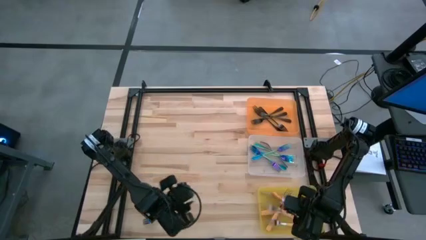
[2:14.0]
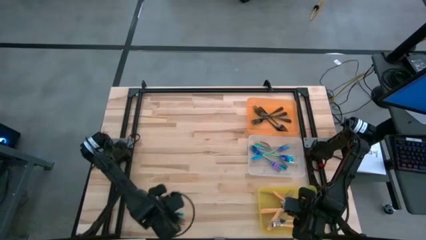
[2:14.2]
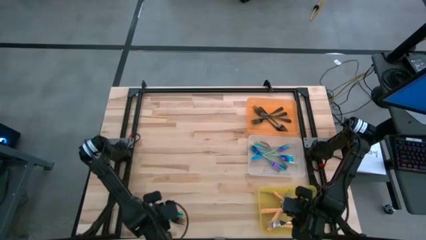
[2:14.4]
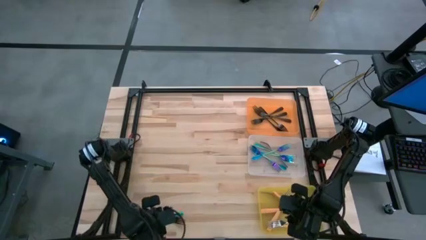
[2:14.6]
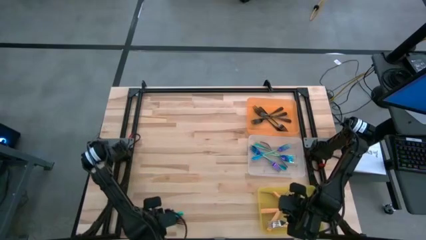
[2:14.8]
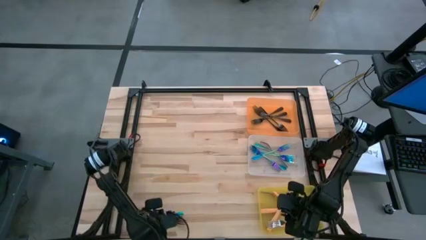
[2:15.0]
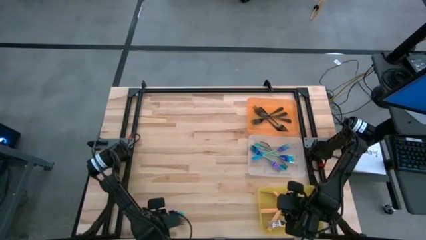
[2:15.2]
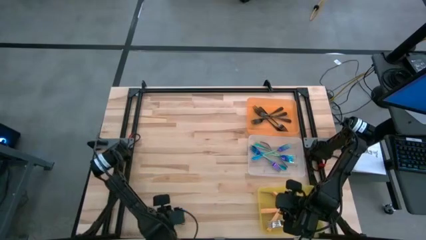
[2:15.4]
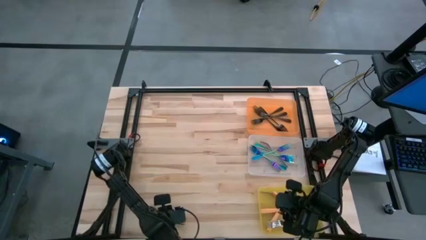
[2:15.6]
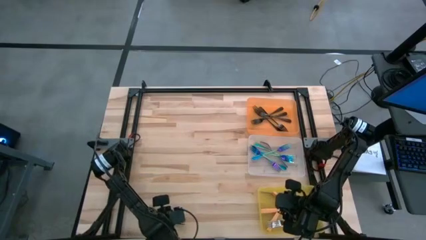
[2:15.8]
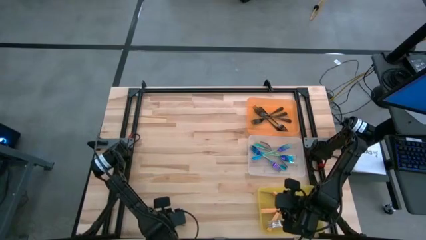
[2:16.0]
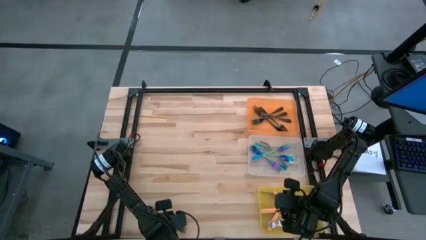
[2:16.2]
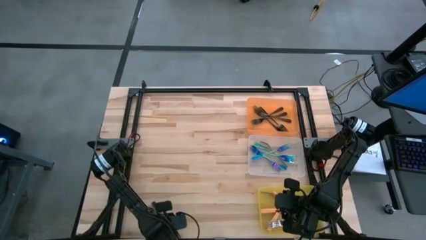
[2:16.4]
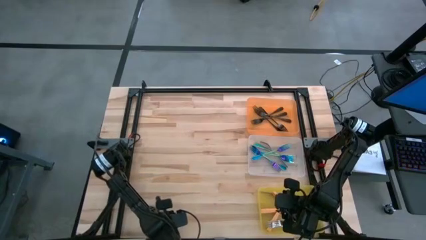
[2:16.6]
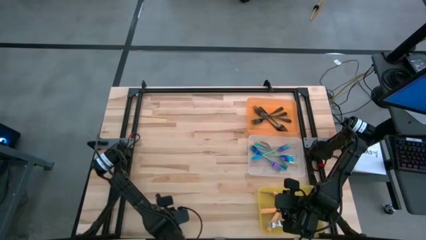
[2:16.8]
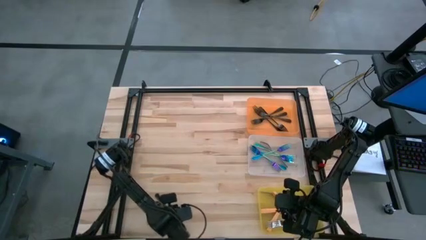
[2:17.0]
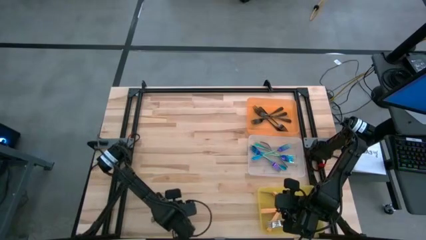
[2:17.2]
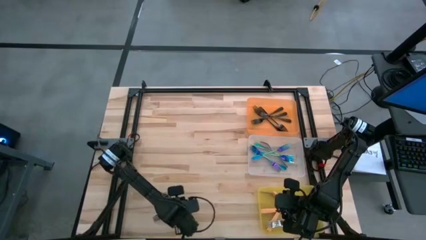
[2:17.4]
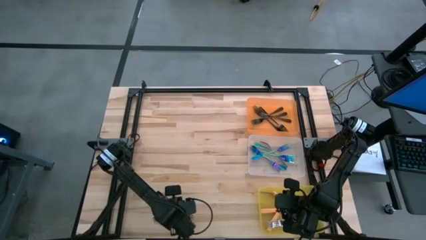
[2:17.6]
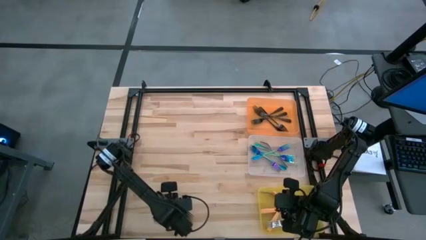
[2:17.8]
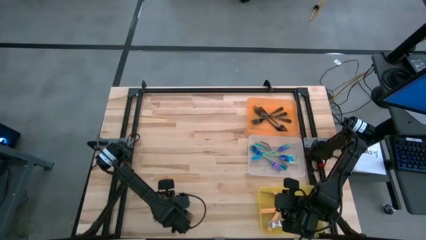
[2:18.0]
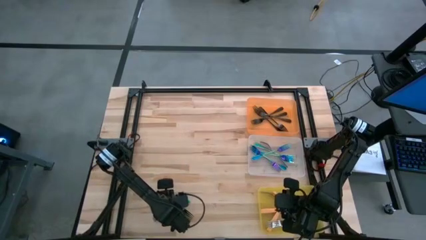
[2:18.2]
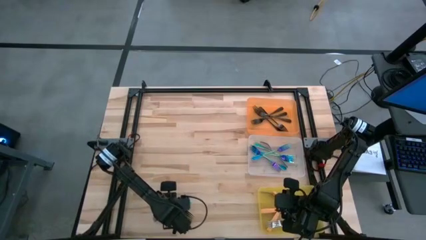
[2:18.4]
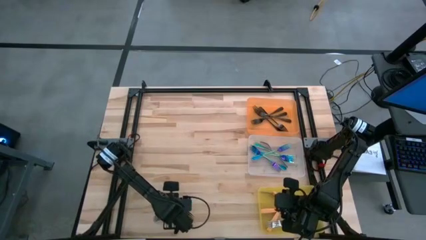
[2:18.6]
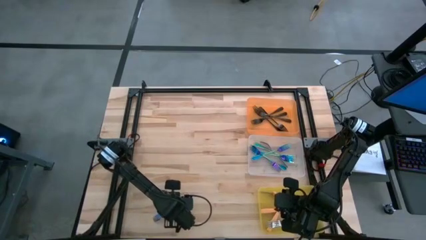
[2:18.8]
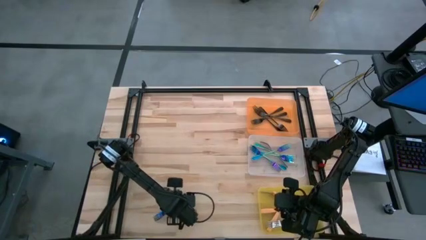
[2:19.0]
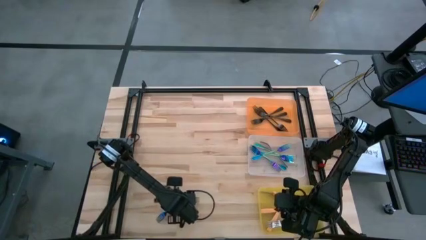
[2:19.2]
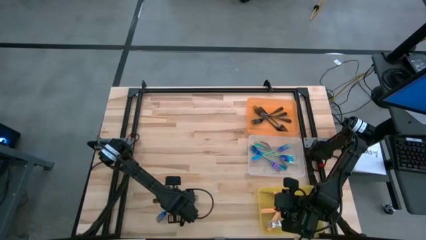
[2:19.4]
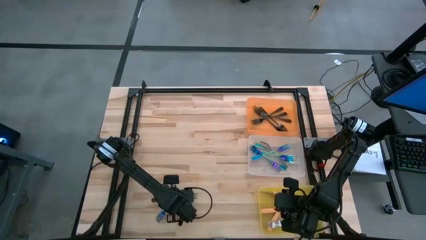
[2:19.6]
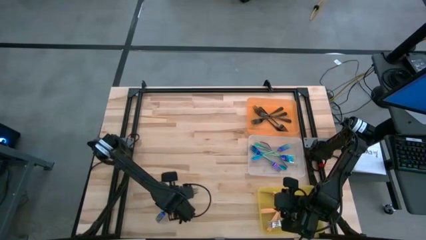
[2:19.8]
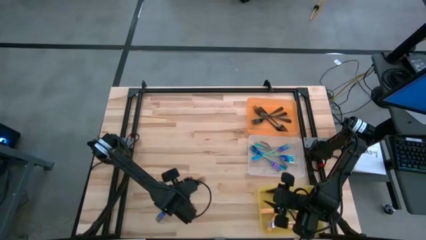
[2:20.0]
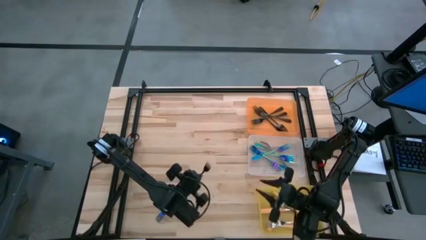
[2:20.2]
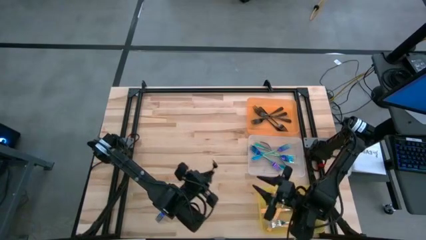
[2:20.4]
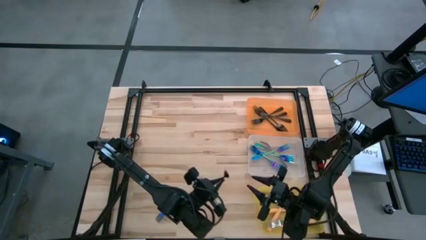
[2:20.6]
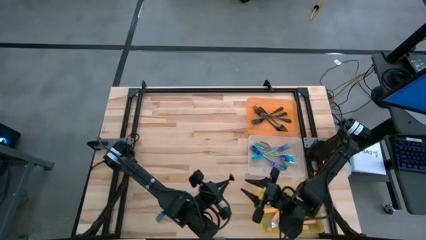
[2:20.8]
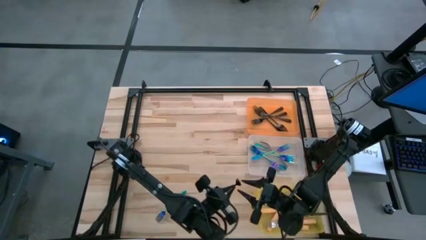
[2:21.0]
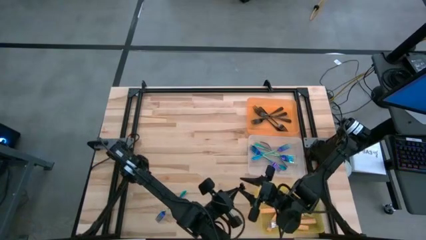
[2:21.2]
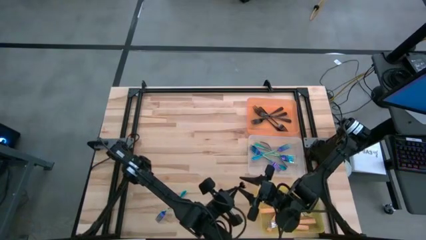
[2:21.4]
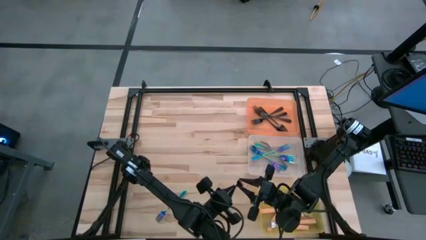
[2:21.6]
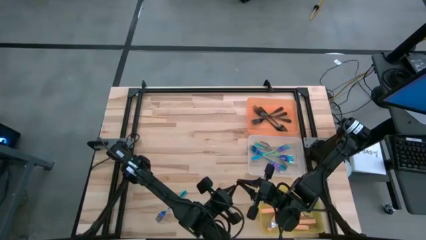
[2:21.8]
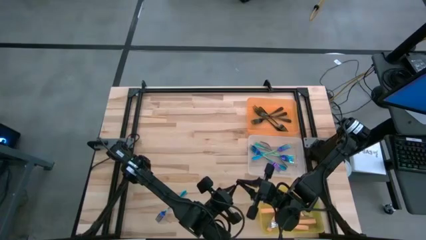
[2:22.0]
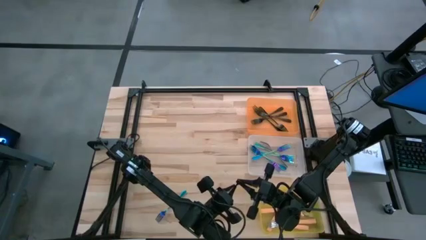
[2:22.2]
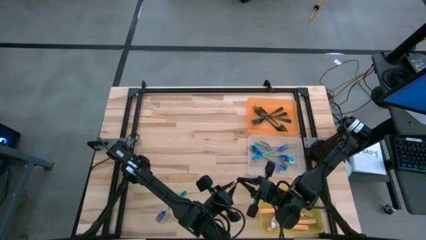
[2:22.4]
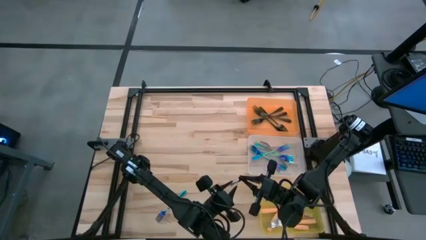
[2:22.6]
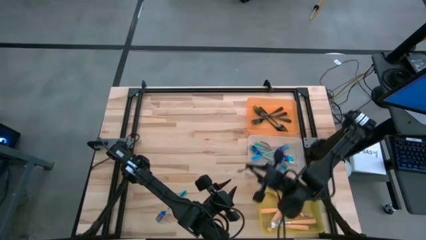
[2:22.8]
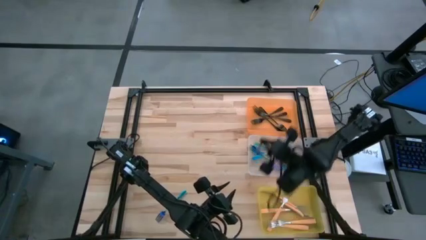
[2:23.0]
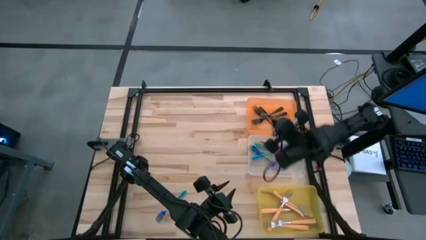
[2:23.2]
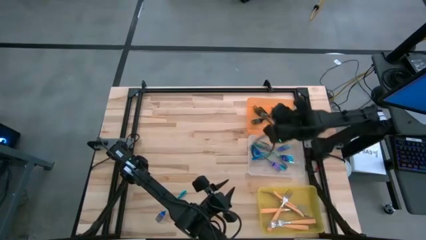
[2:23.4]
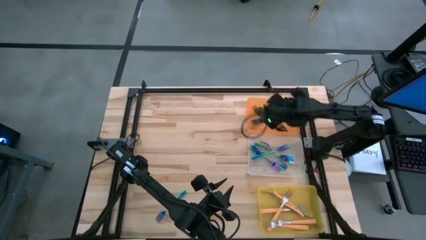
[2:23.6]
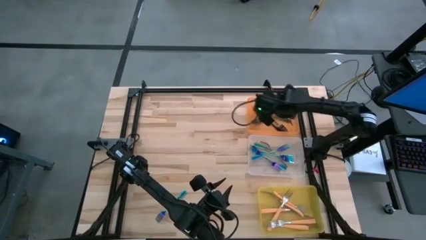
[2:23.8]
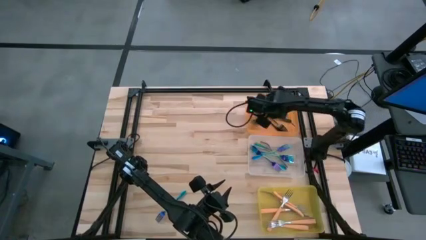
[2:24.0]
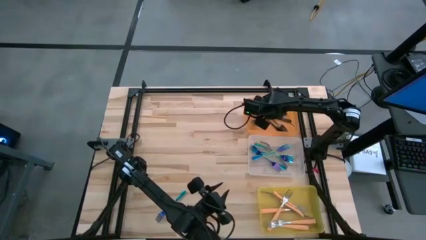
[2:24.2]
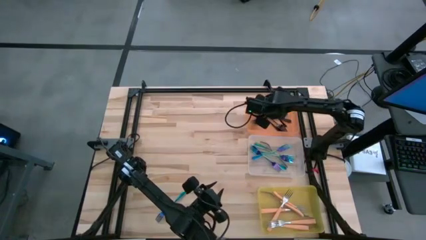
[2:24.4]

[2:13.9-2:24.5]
Task: Sort silverware by color (type)
Put the black fork into the orange bin

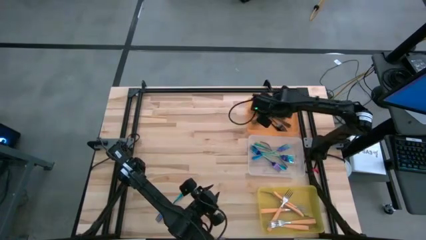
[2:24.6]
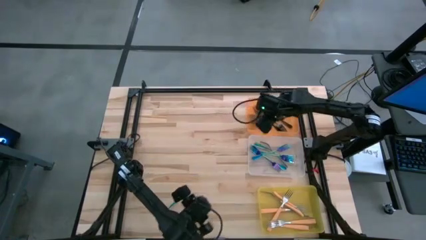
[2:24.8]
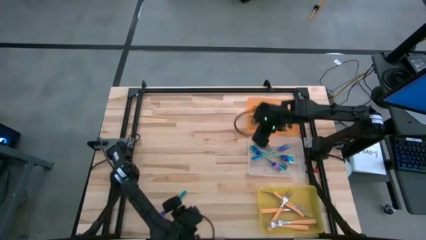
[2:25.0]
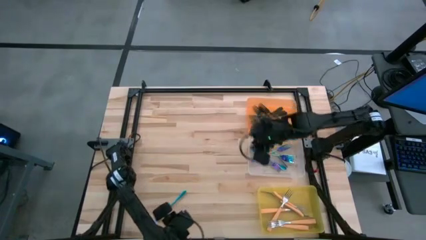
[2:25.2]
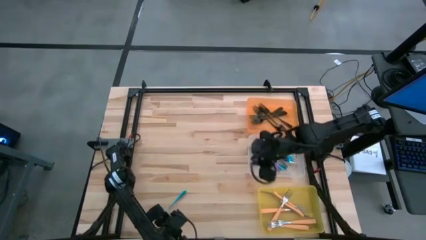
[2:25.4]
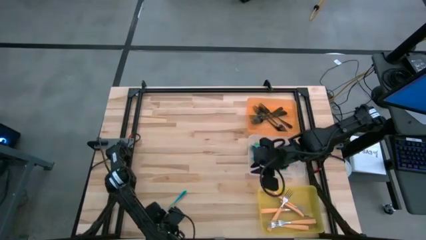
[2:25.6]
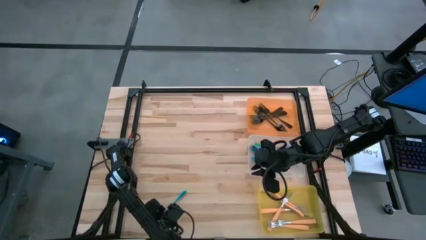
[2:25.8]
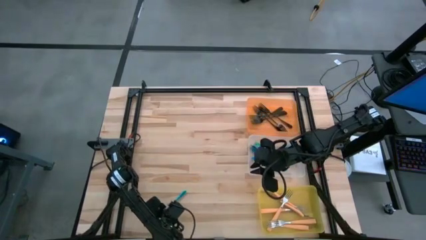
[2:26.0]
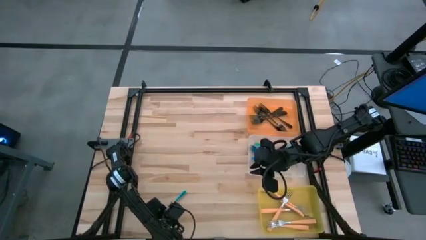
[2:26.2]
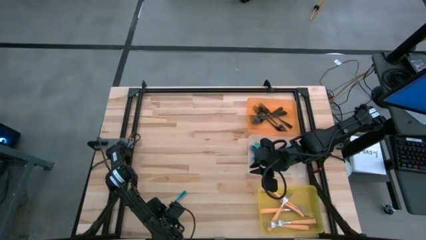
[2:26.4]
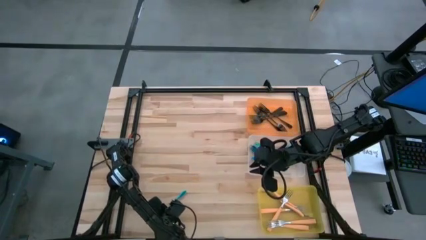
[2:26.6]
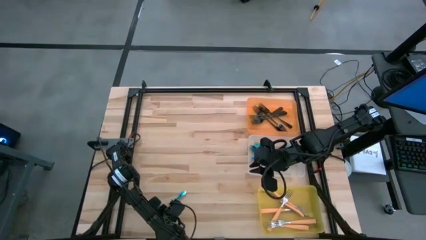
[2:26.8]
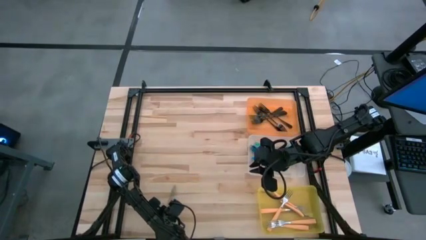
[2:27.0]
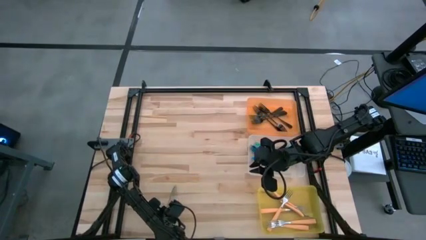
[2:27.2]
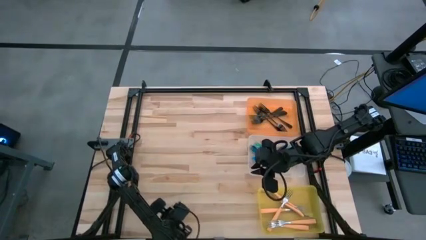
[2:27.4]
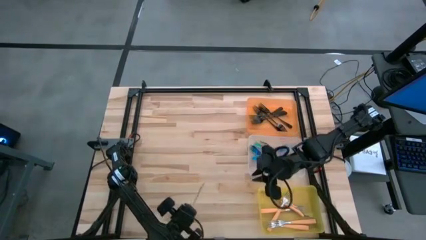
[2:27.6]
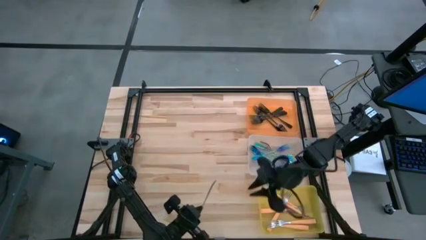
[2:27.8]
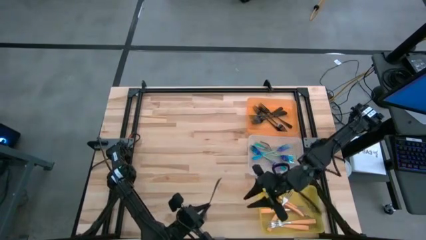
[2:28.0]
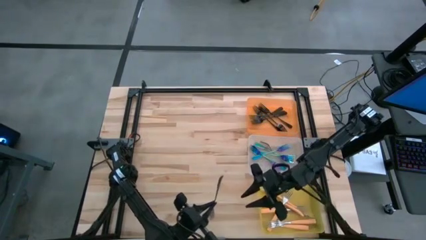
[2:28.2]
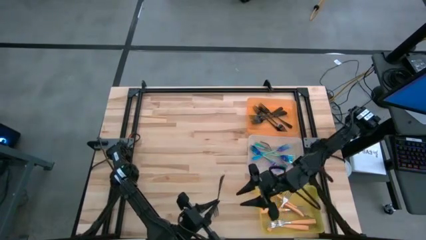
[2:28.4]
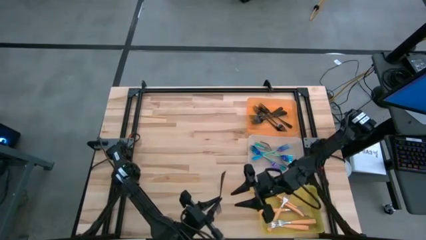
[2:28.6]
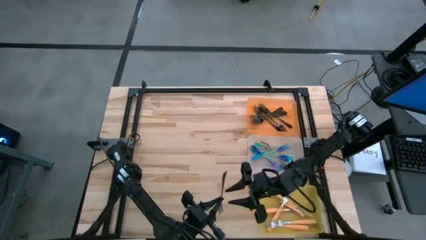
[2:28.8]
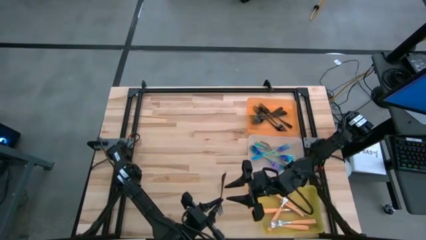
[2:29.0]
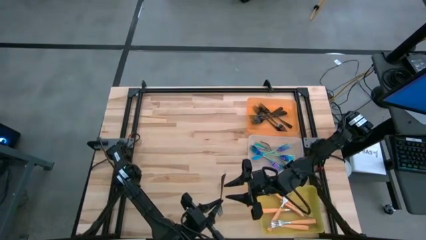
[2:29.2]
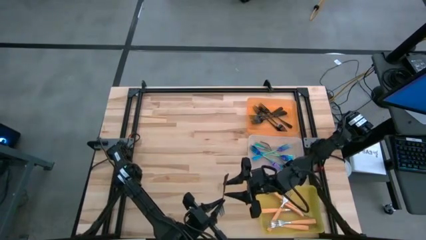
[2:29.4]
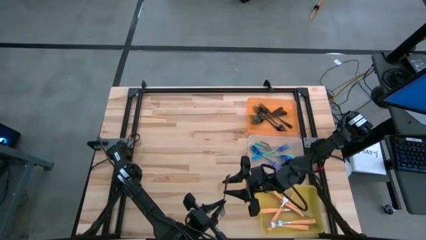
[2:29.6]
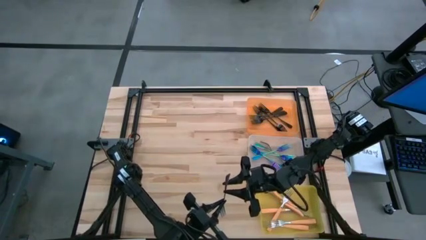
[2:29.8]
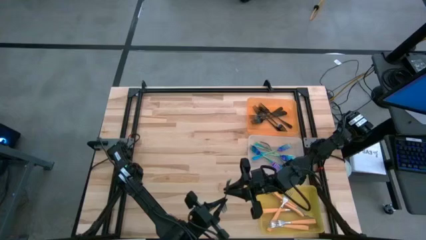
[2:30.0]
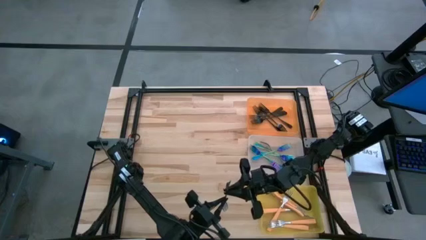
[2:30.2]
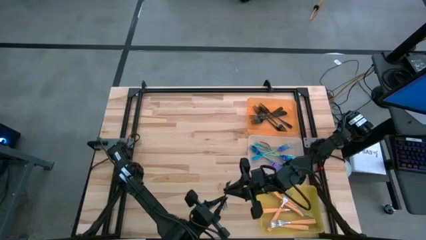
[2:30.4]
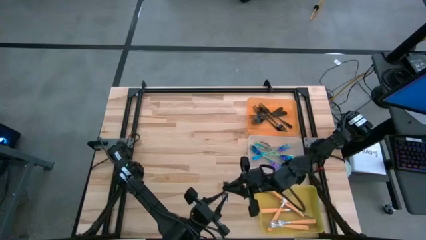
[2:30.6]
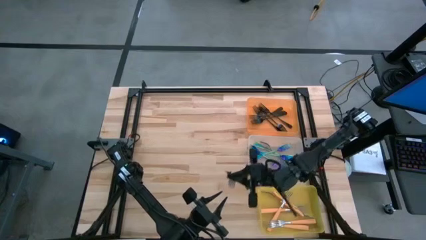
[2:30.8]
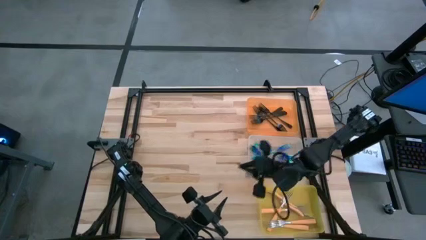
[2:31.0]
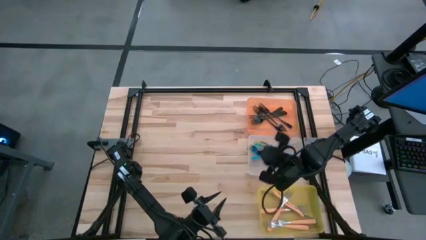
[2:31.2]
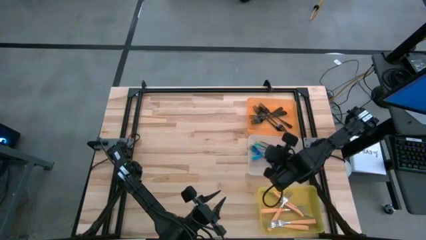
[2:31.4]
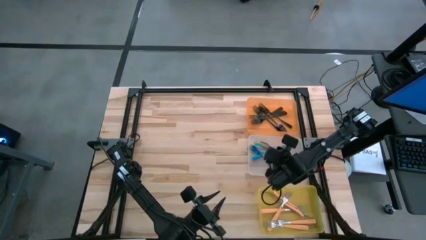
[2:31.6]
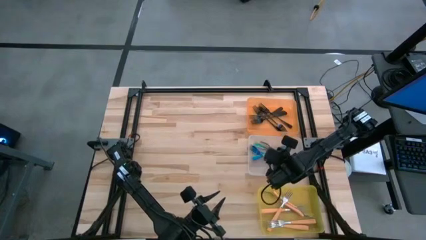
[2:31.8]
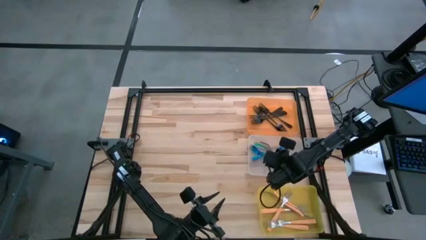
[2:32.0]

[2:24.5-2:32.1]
Put the blue fork into the transparent bin
